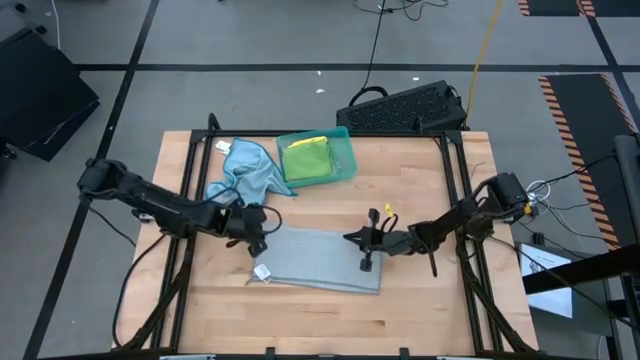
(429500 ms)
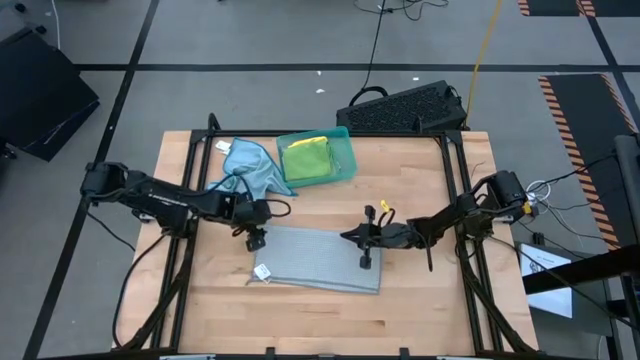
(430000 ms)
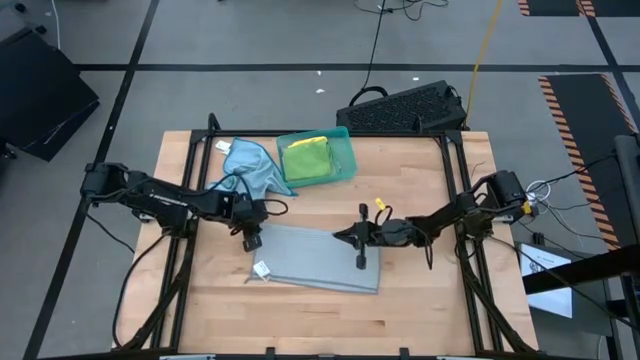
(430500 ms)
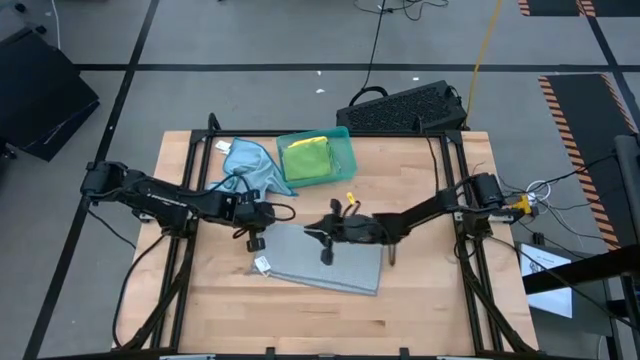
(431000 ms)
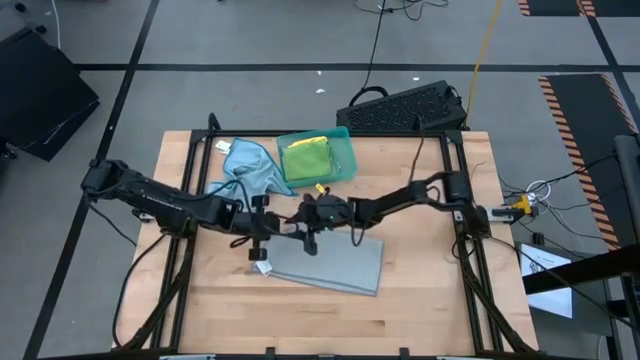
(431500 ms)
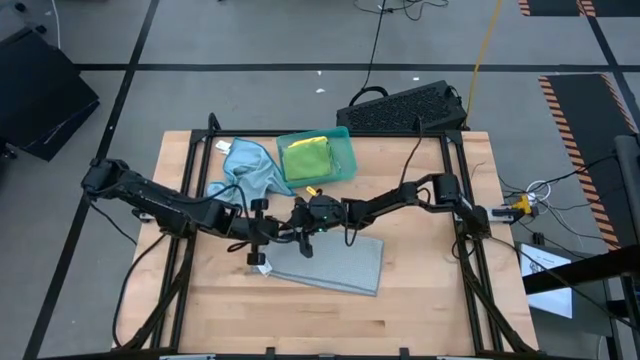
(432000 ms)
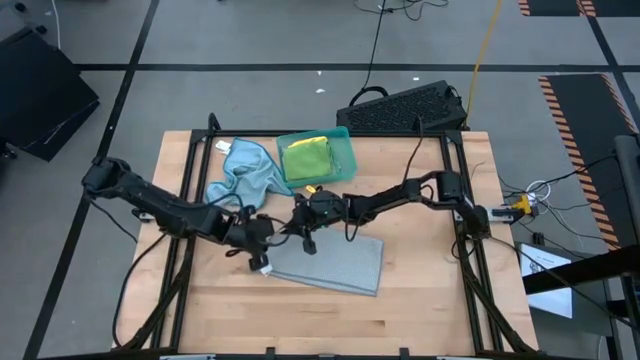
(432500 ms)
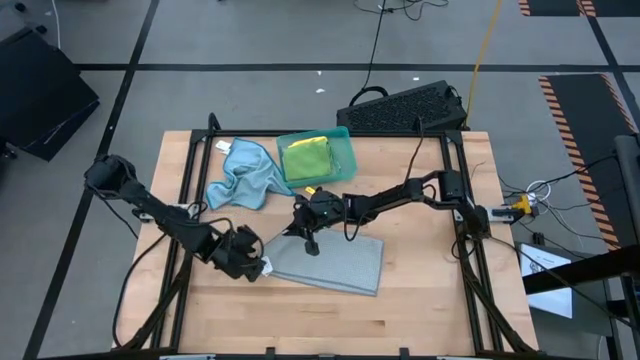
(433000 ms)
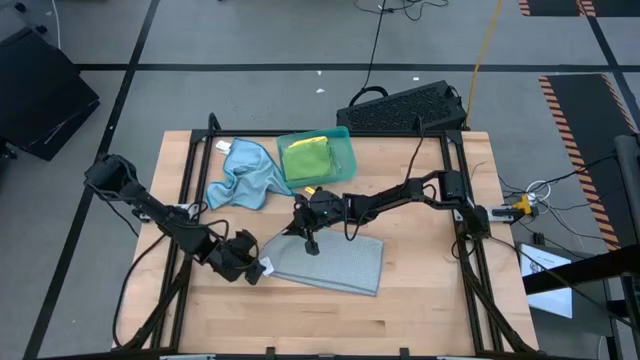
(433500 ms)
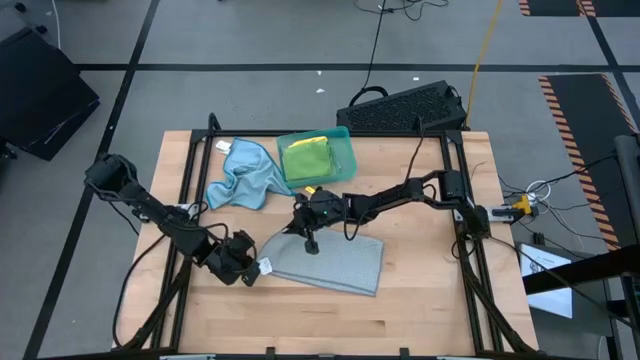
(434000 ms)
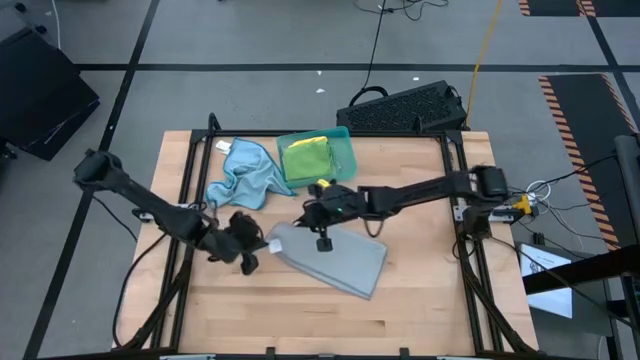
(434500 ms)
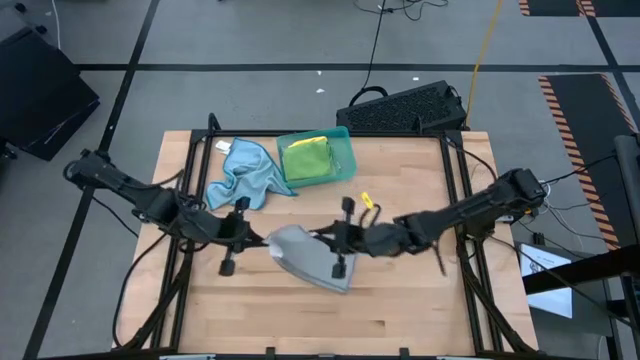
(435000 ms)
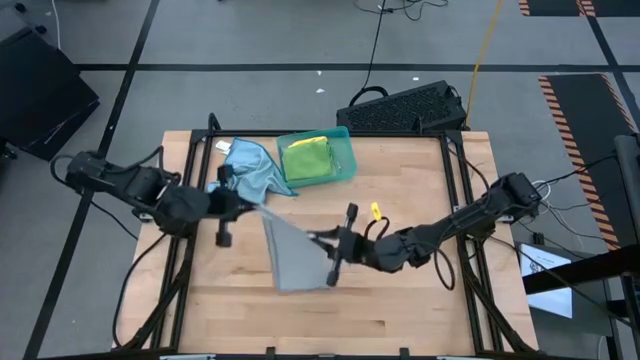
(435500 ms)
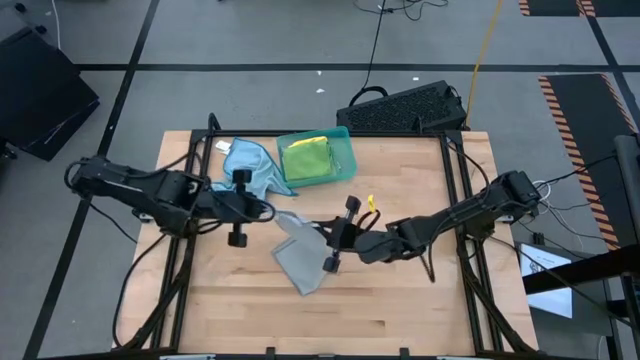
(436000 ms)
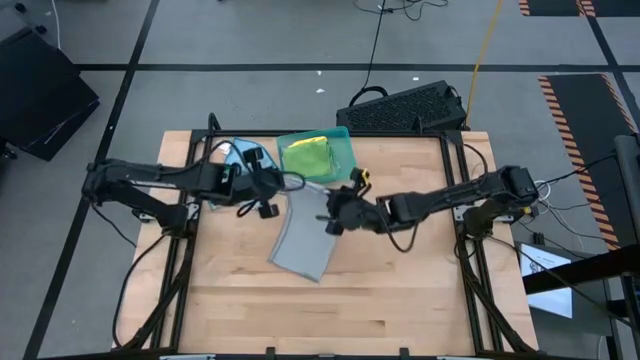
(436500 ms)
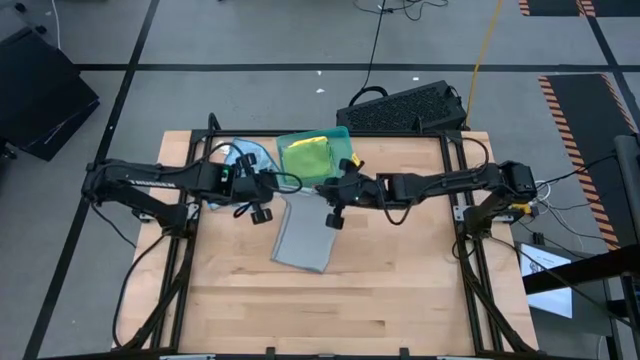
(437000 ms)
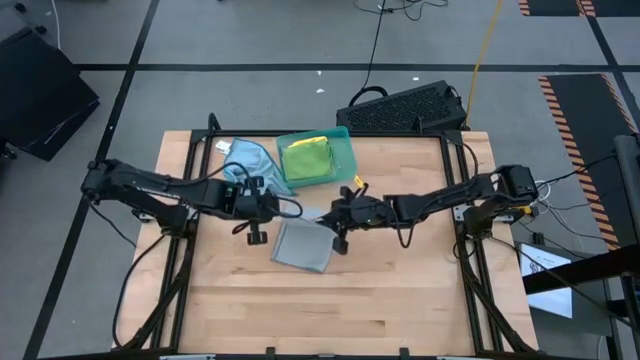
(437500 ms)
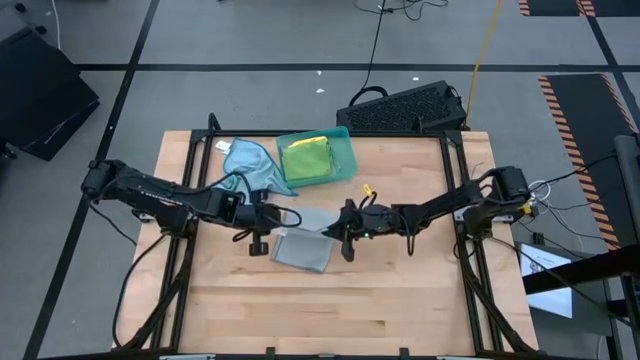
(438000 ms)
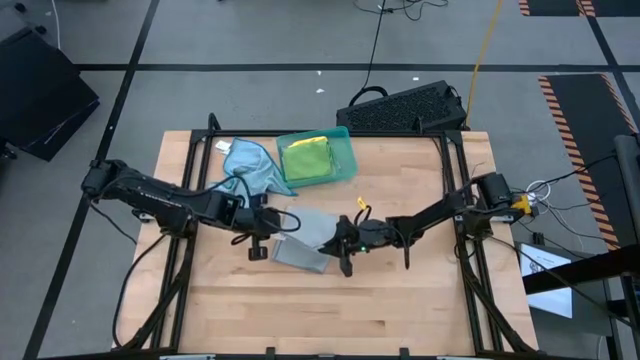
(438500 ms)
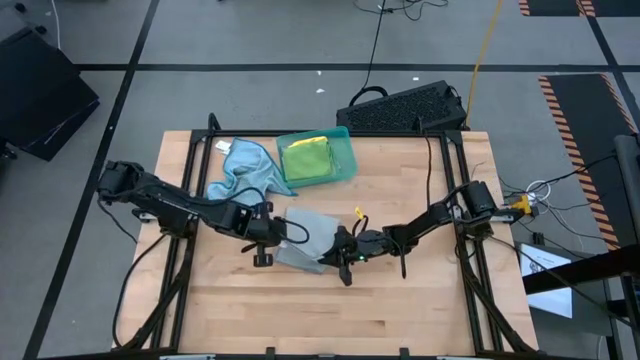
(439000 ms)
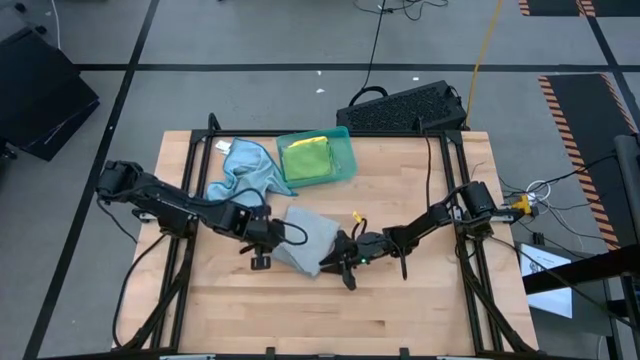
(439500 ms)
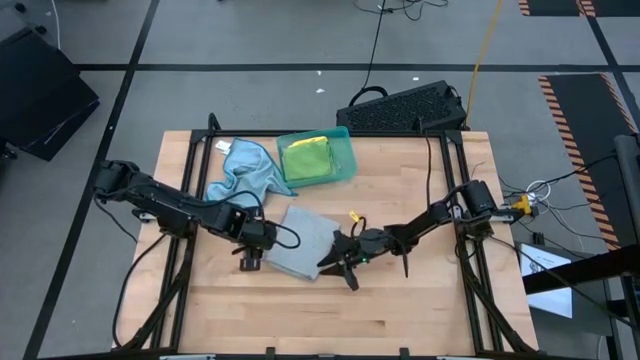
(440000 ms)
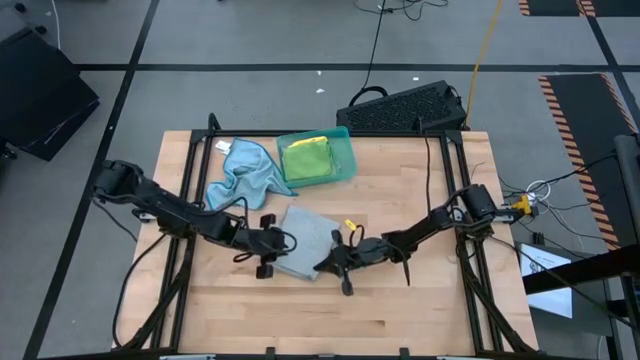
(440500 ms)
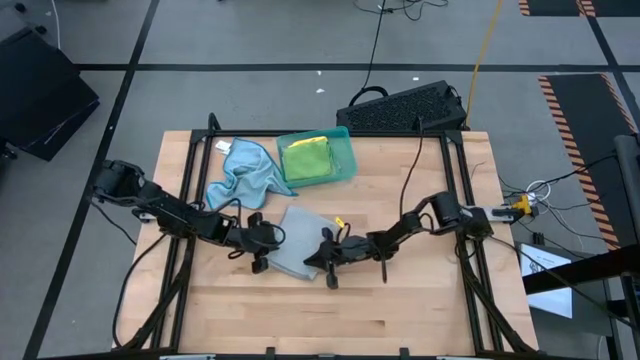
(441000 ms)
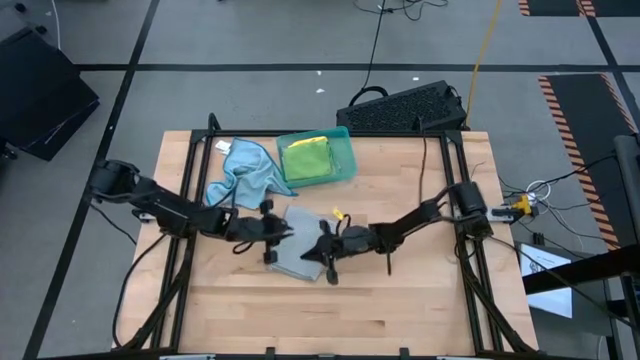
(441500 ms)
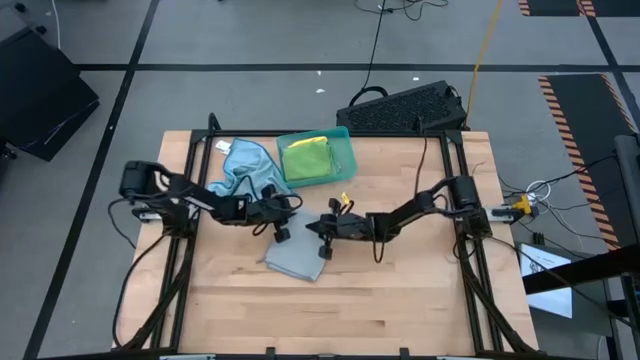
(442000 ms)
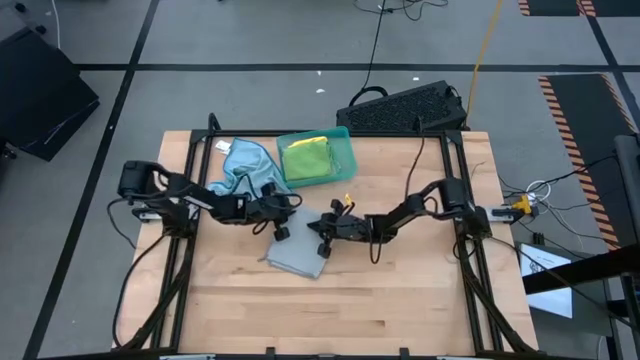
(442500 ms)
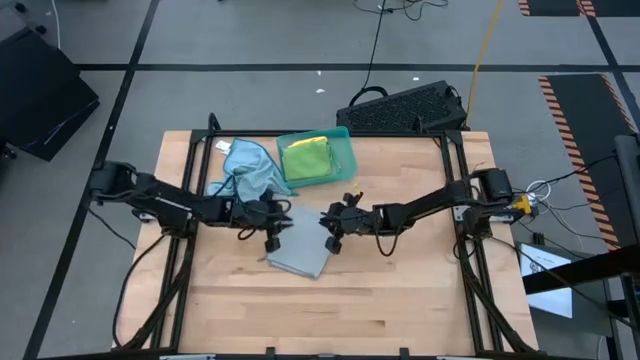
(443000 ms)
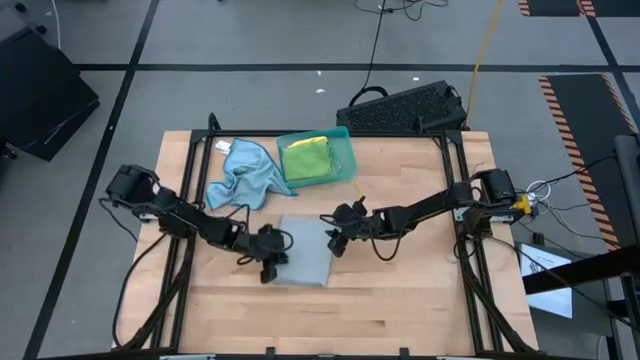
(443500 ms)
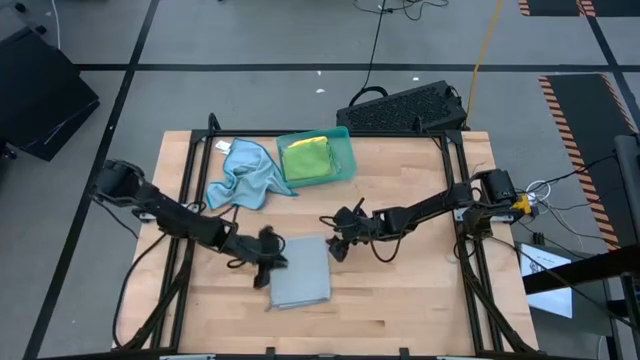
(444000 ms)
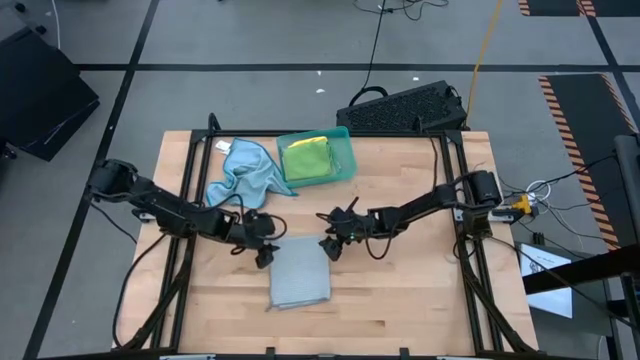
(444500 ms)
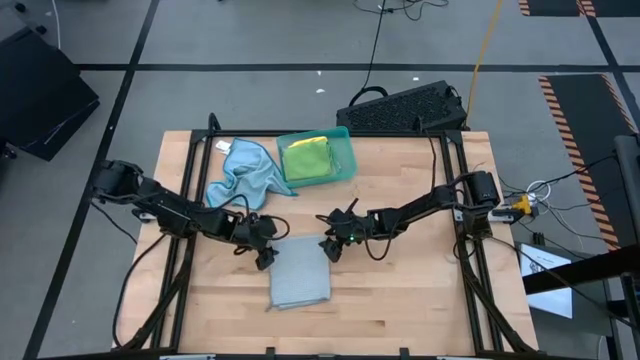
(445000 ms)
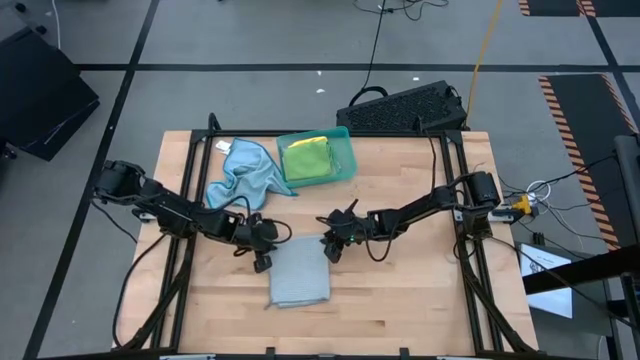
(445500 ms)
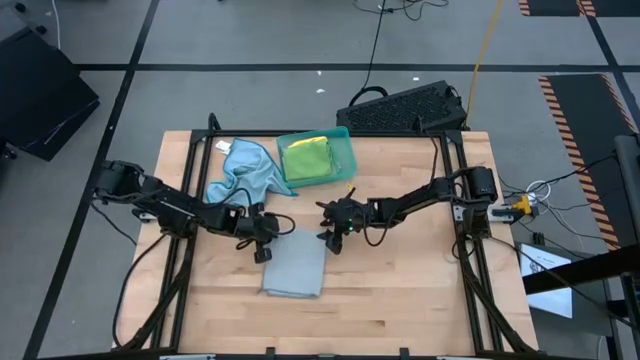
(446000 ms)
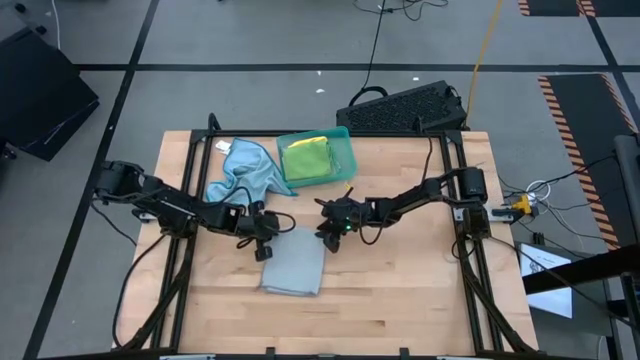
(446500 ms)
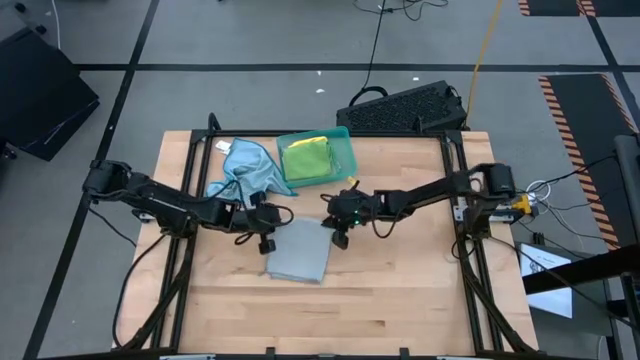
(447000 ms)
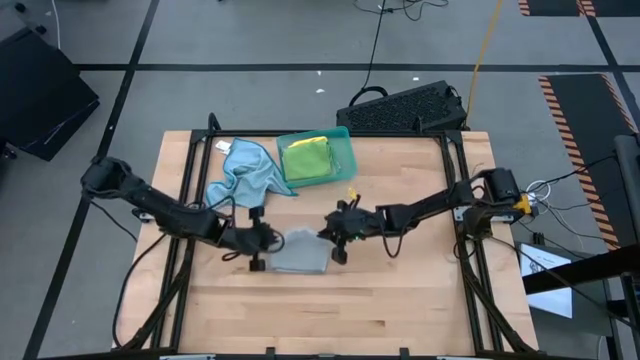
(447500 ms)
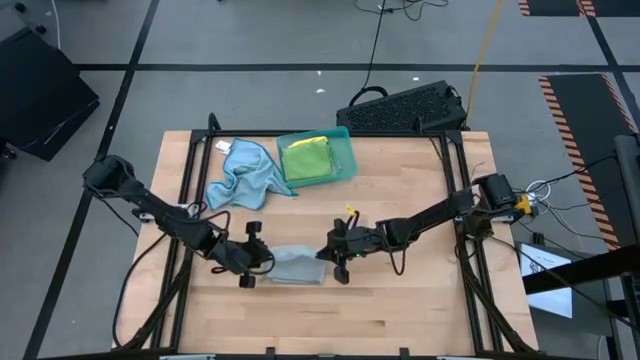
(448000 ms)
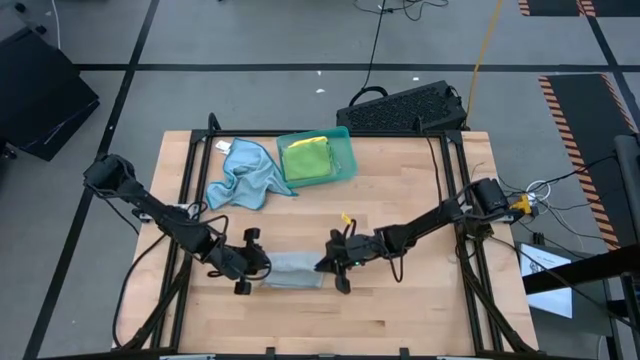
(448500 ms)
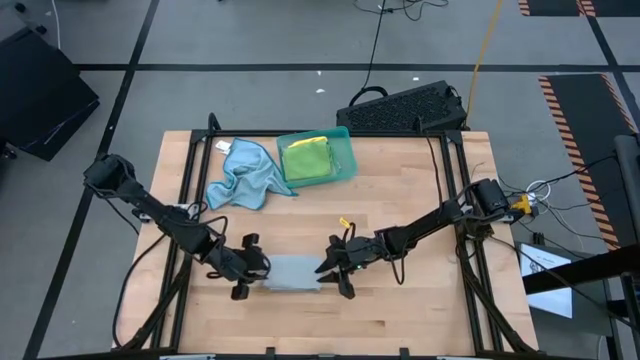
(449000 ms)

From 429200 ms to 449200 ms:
Task: Fold microfiber towels
Fold the gray microfiber cloth

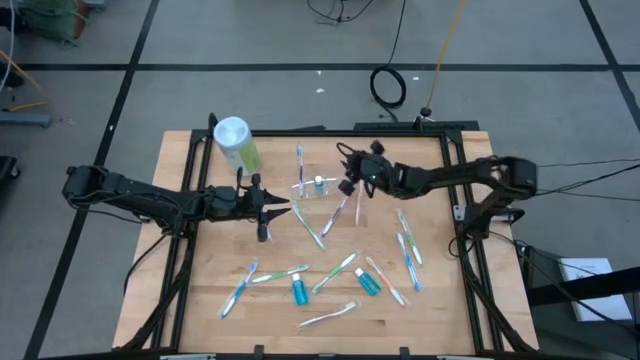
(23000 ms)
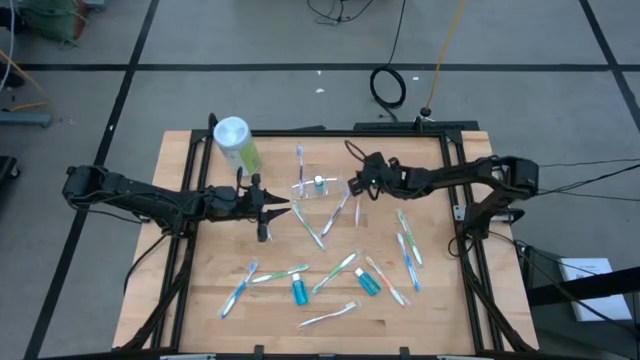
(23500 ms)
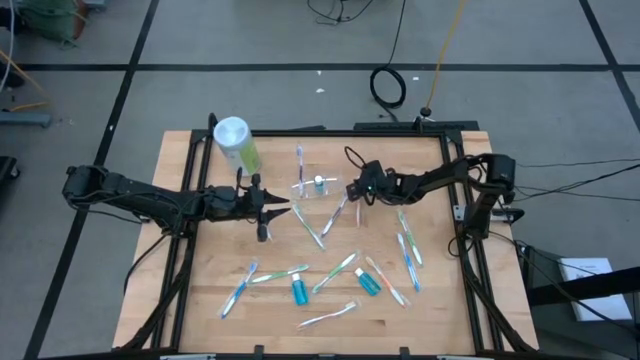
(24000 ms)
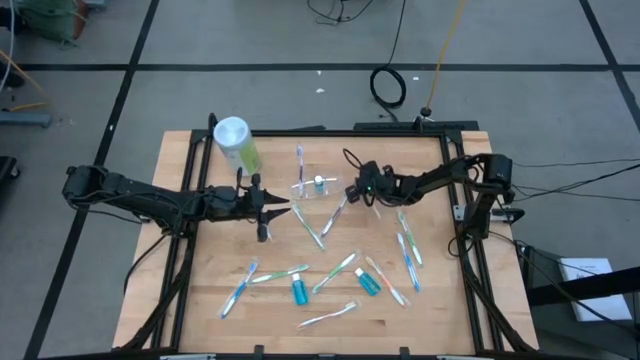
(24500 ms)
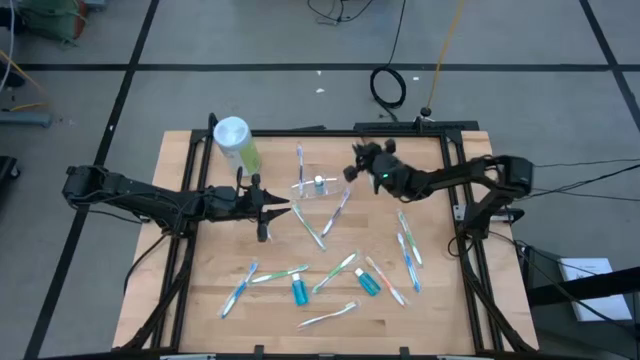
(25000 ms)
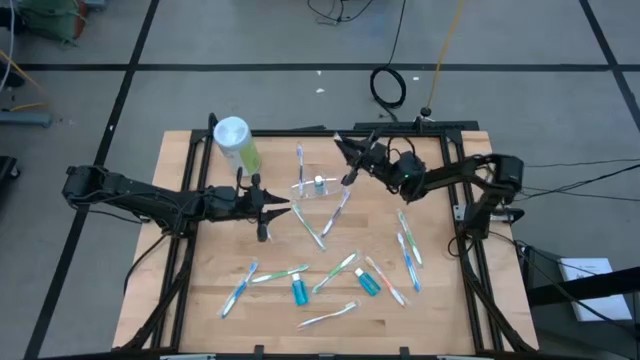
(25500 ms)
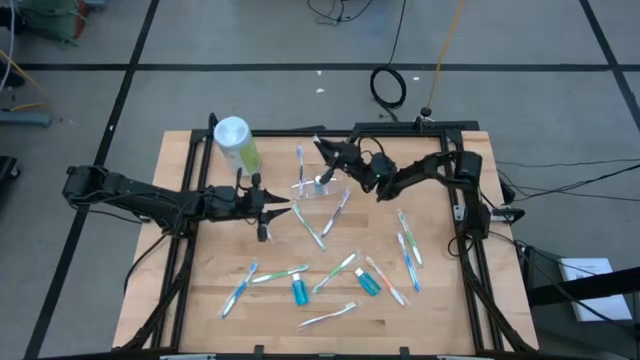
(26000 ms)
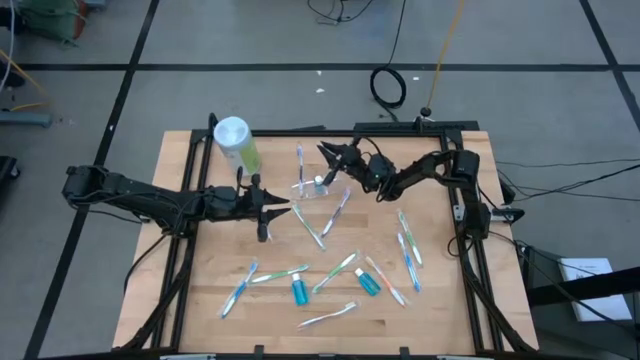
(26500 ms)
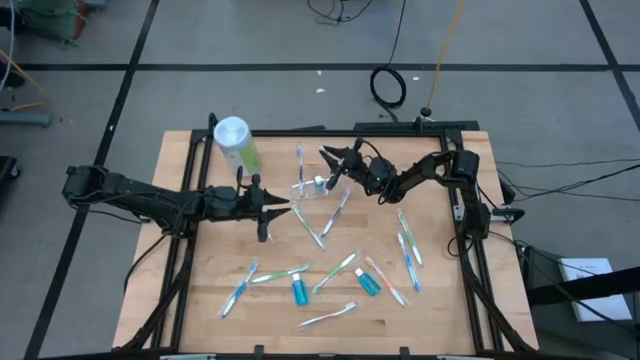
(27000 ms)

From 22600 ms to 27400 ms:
Task: Pick & Place toothbrushing station
Put the orange toothbrush into the transparent organizer
